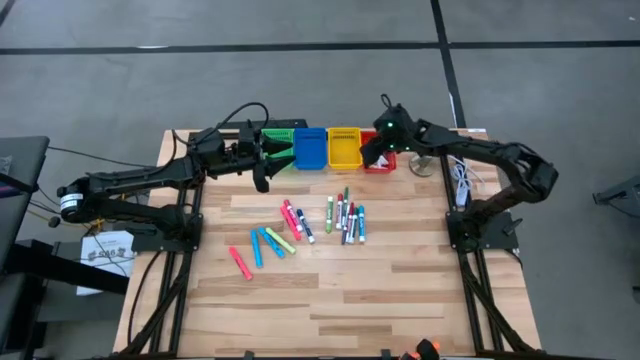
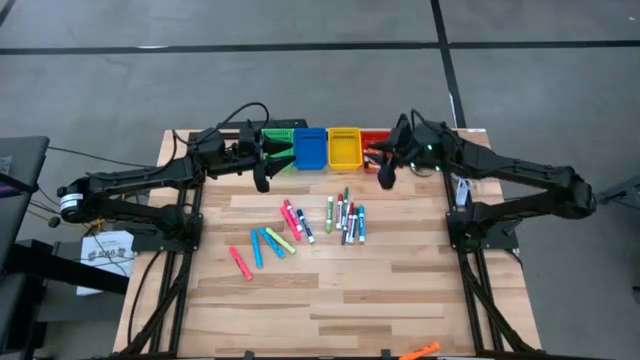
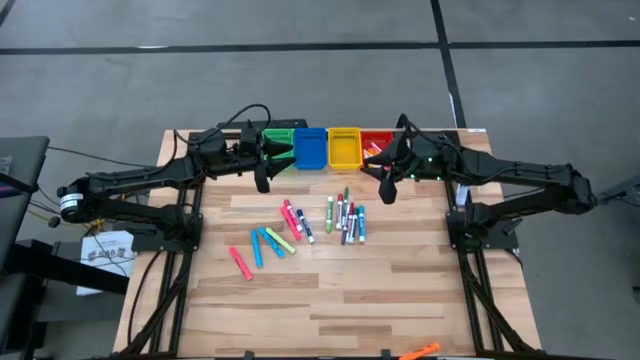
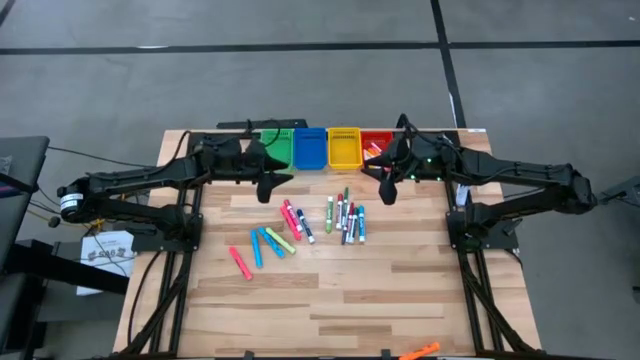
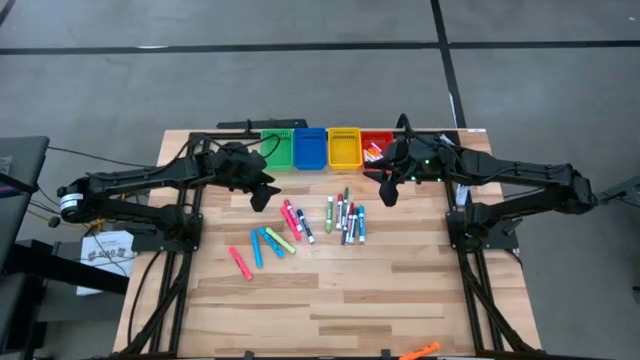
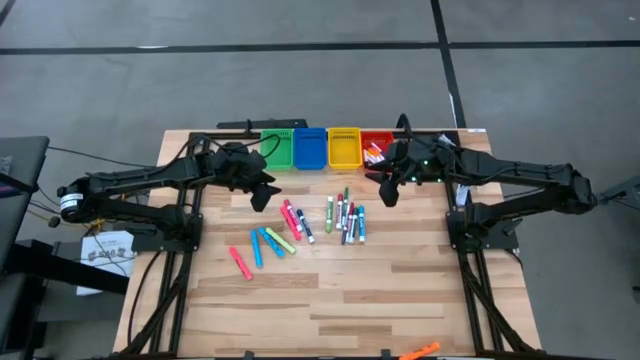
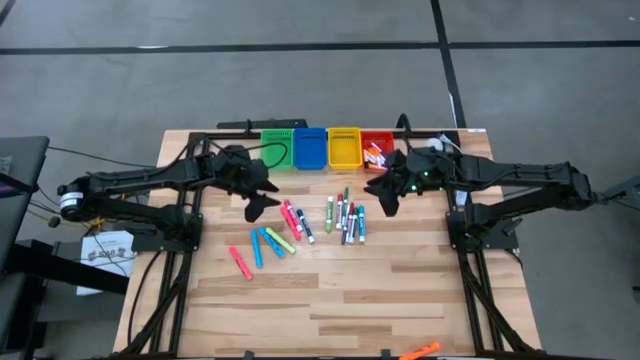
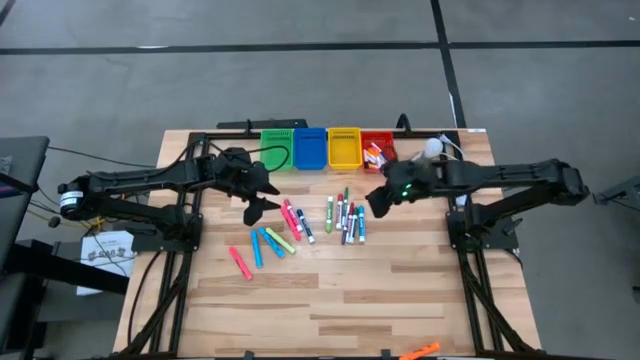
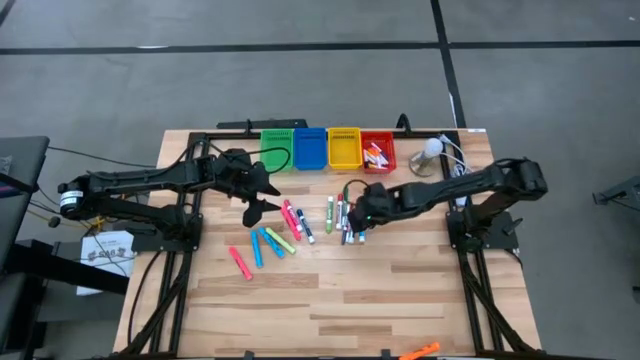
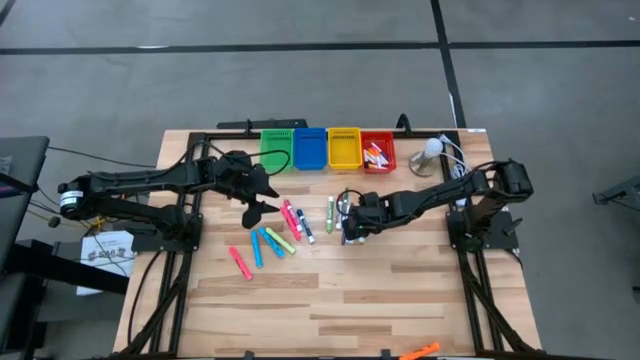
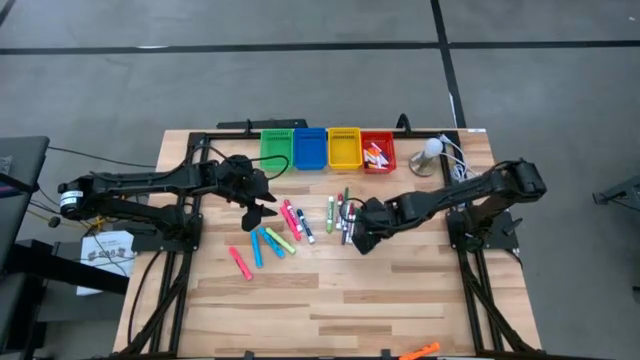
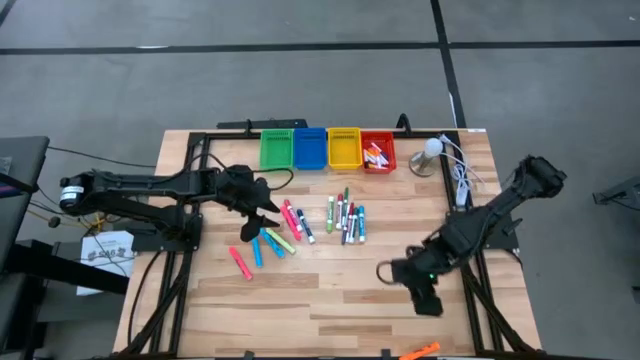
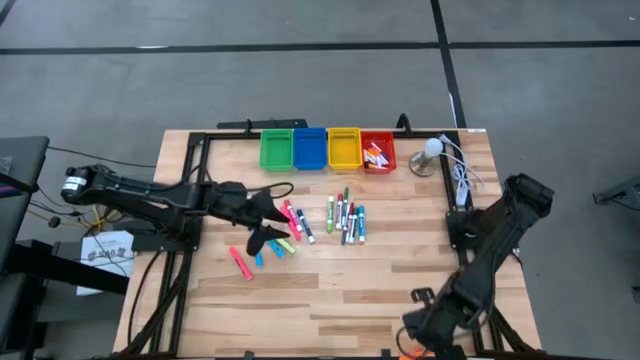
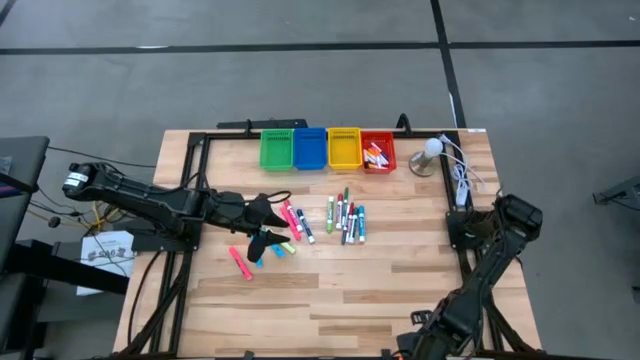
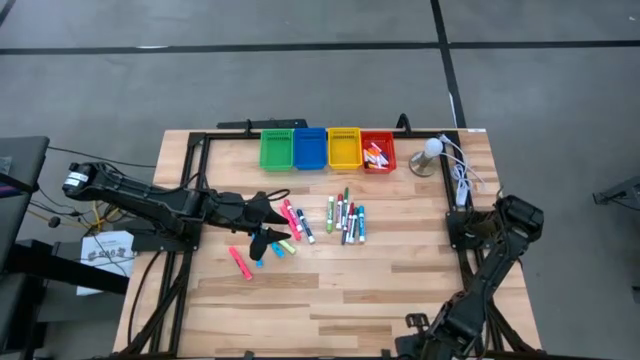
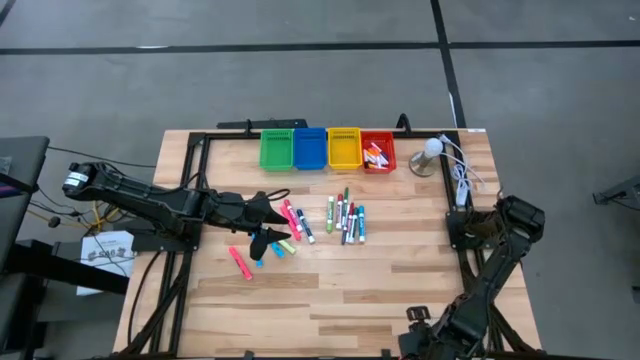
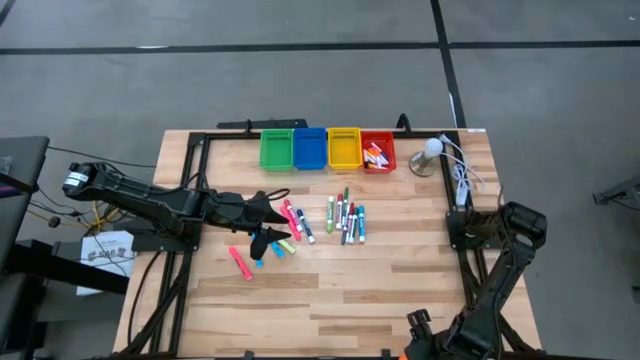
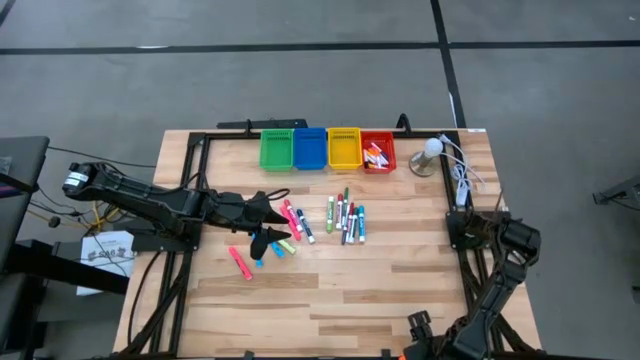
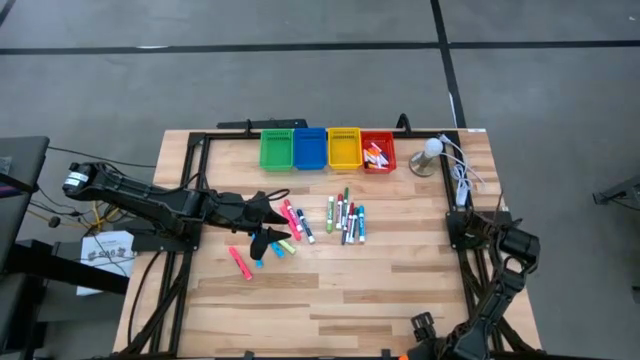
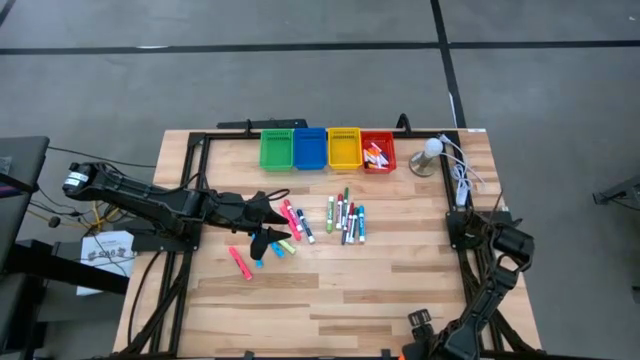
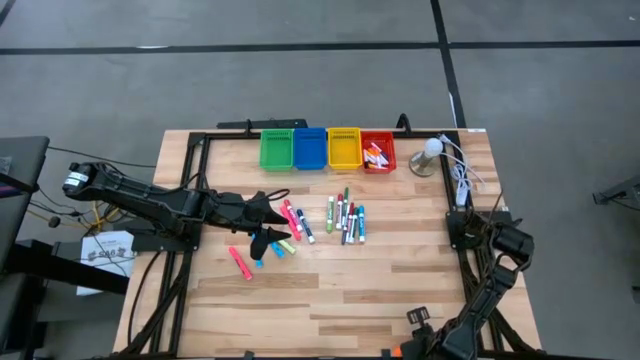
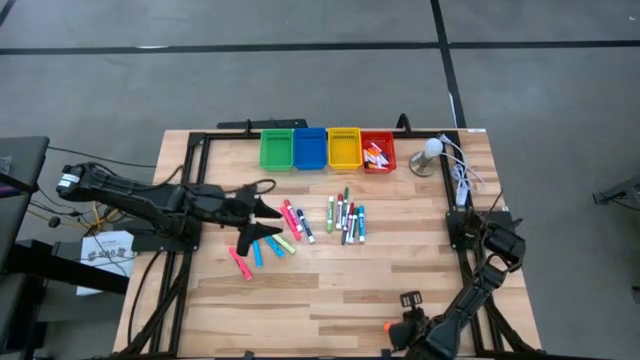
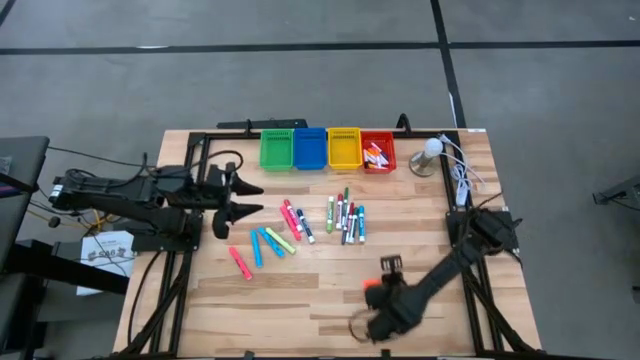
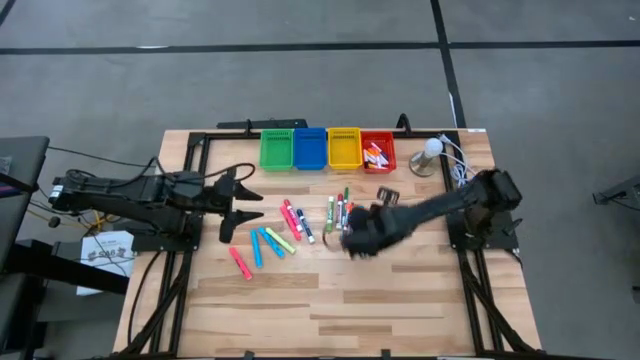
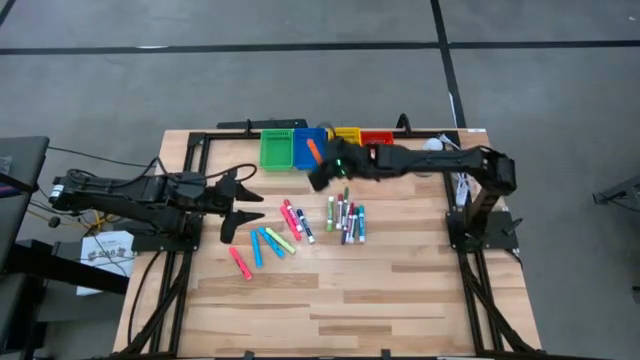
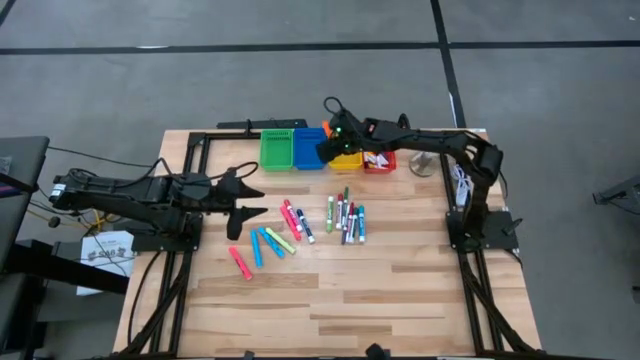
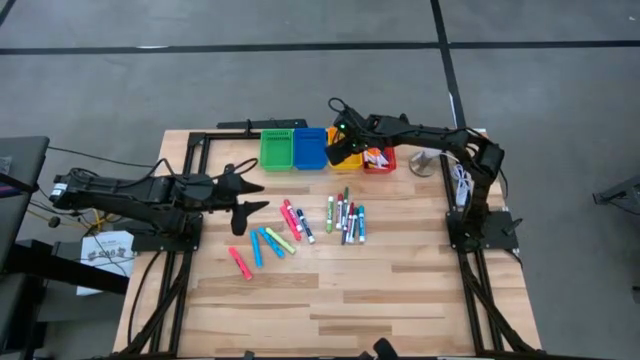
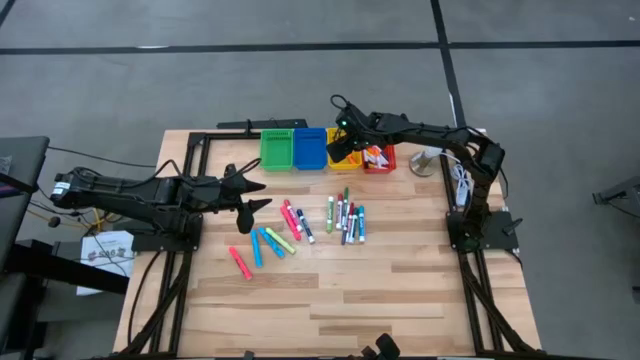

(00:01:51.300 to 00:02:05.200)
Task: Pick & Place Markers
Put the orange highlighter into the yellow basket

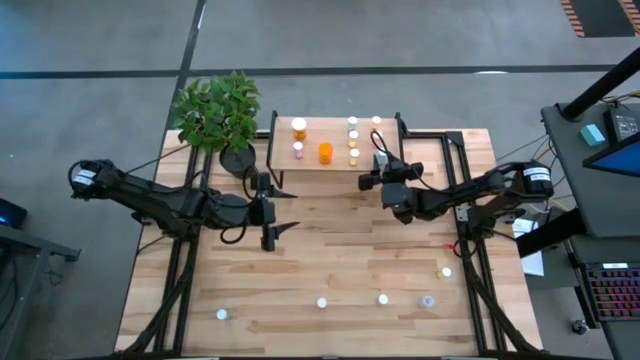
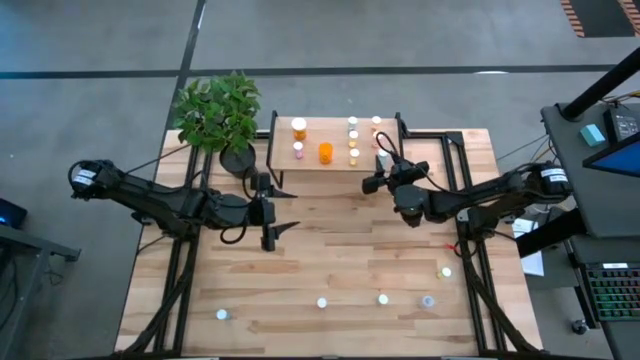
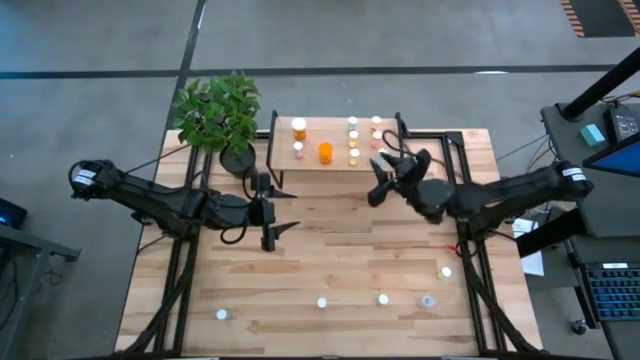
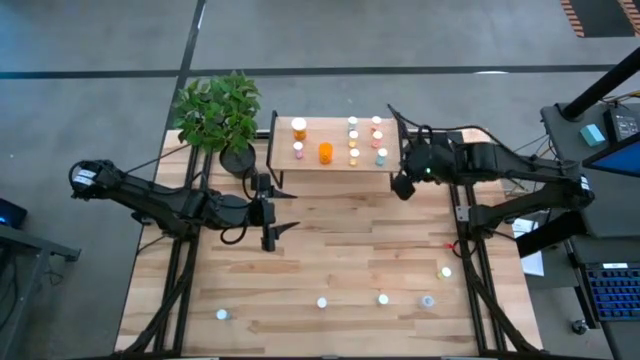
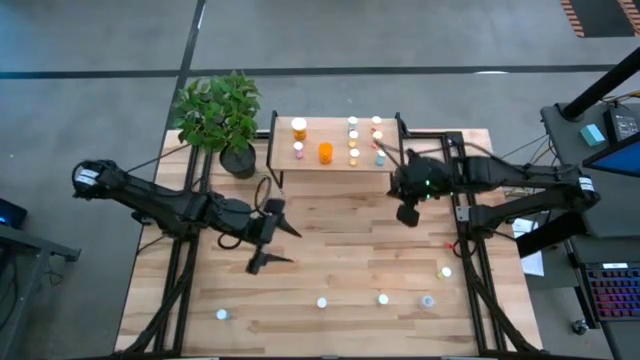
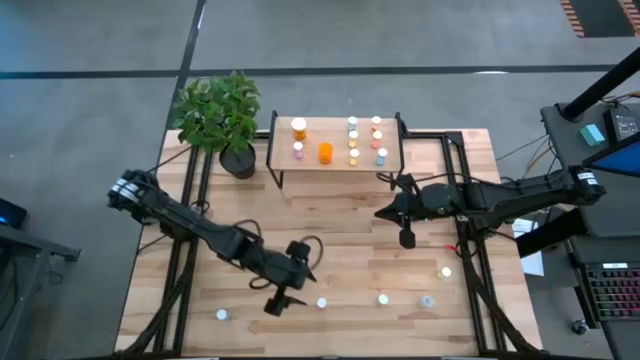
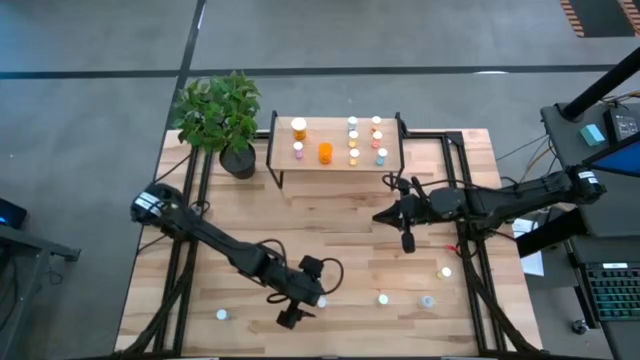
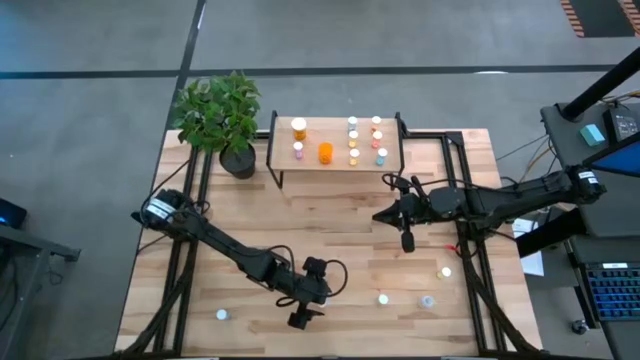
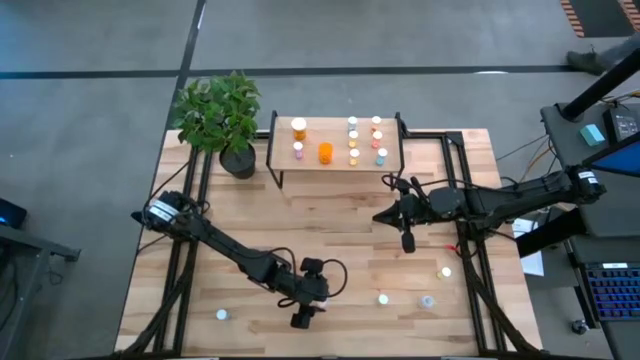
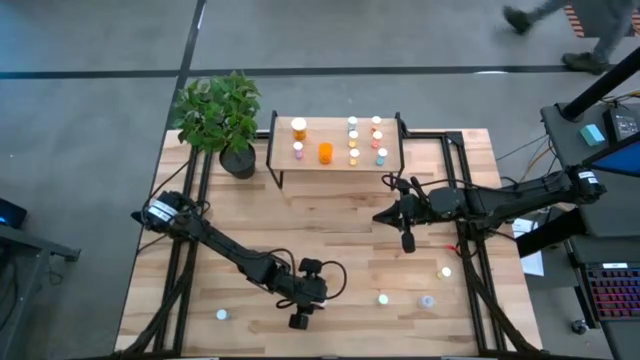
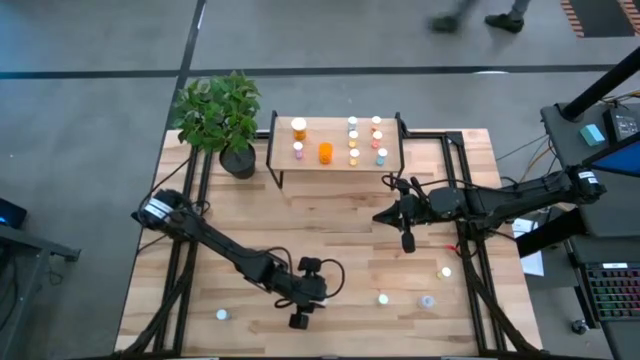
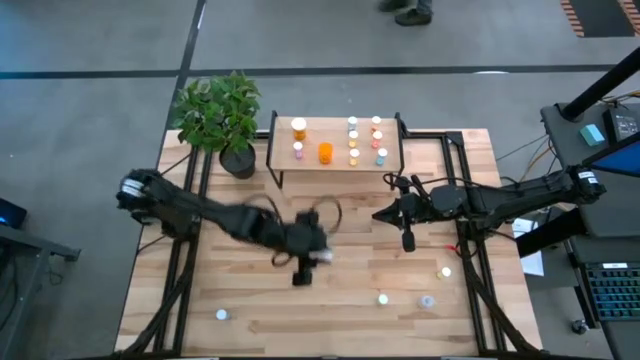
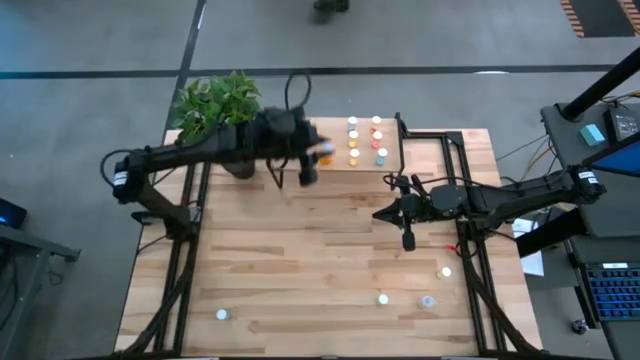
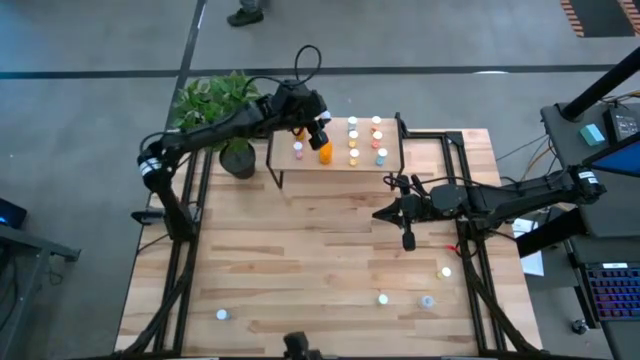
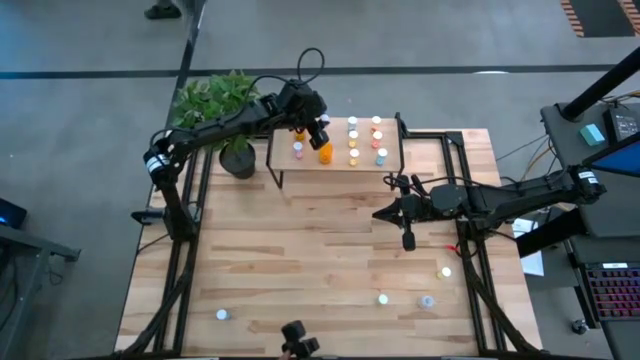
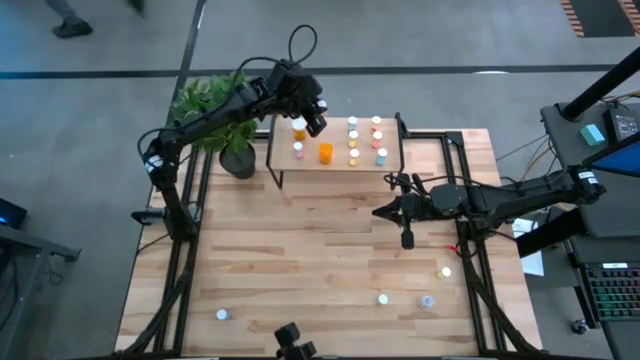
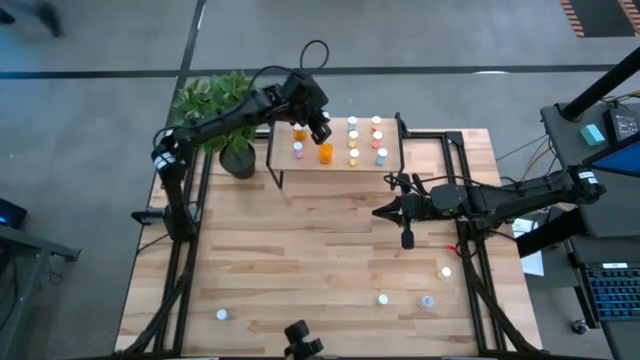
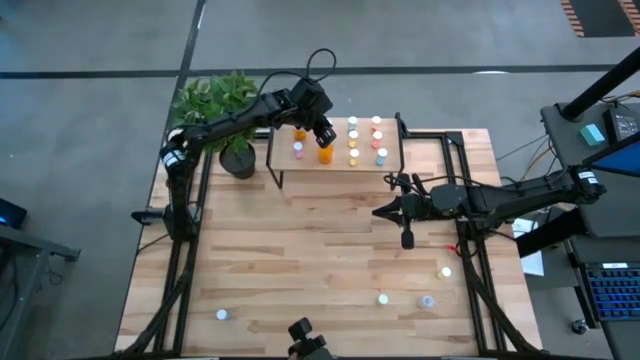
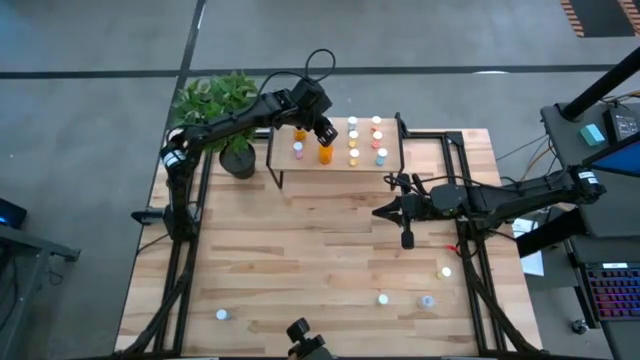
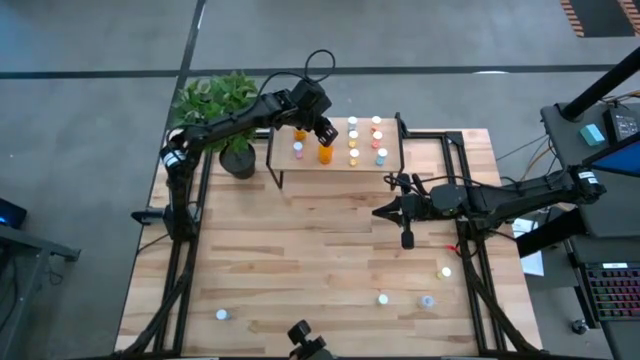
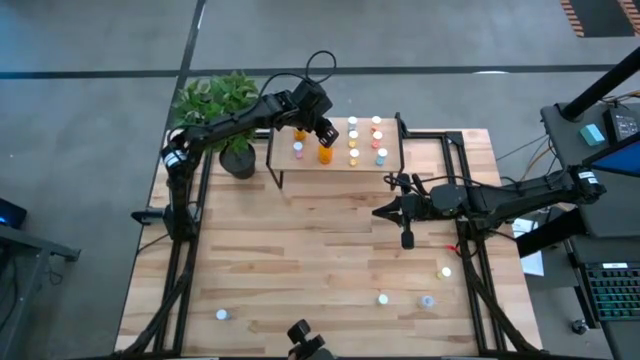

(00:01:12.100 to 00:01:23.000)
Task: Pick and place medicine bottles onto shelf by color
Put the red pill bottle on the shelf
